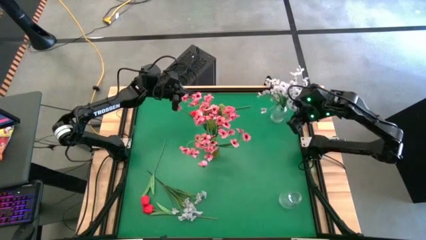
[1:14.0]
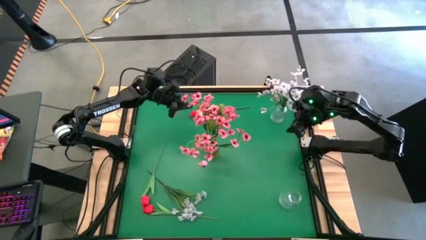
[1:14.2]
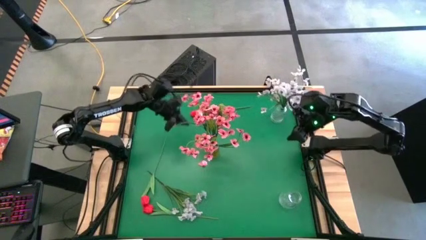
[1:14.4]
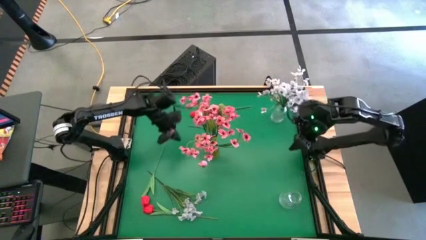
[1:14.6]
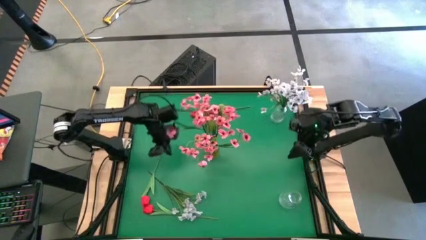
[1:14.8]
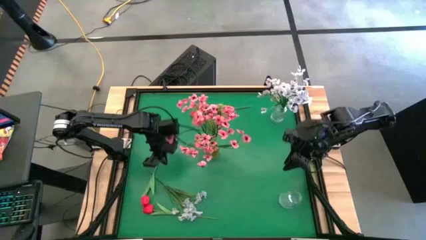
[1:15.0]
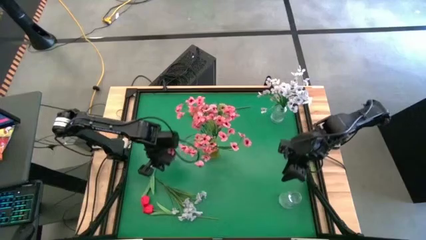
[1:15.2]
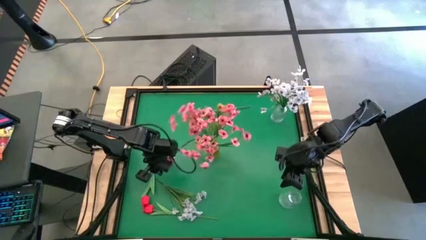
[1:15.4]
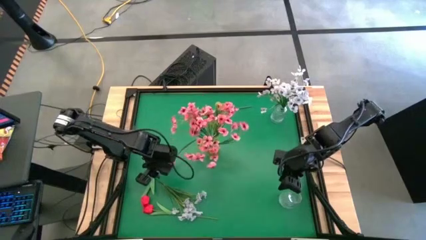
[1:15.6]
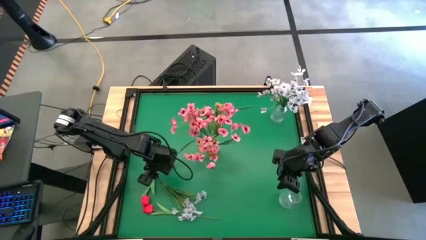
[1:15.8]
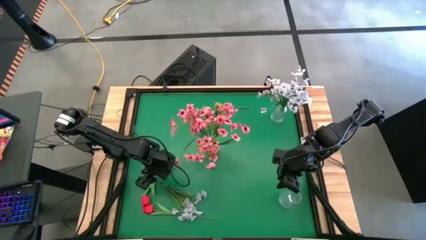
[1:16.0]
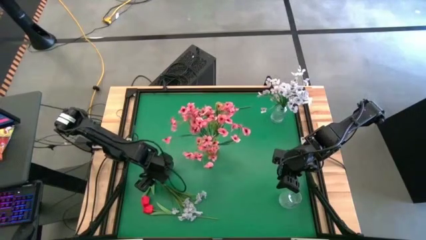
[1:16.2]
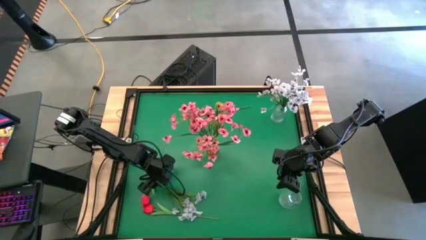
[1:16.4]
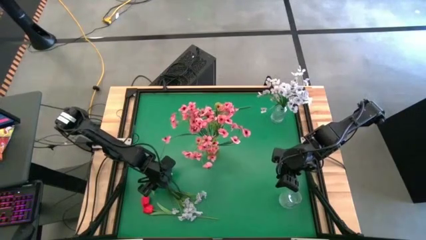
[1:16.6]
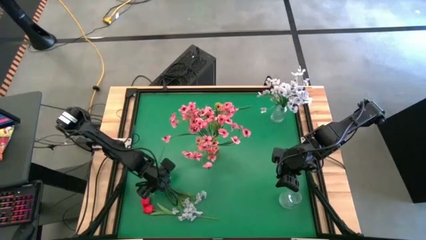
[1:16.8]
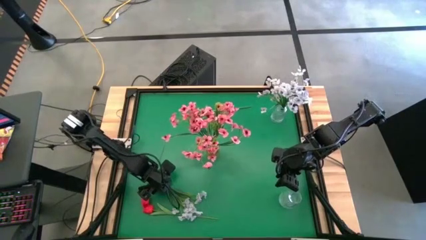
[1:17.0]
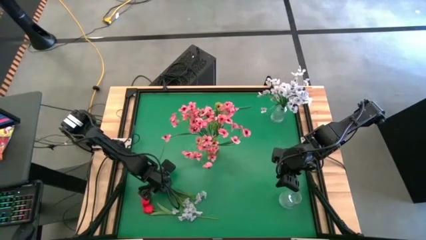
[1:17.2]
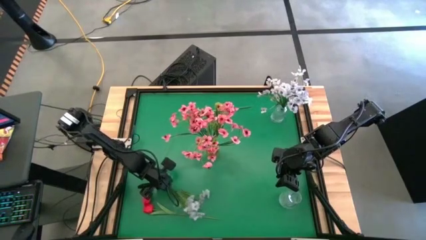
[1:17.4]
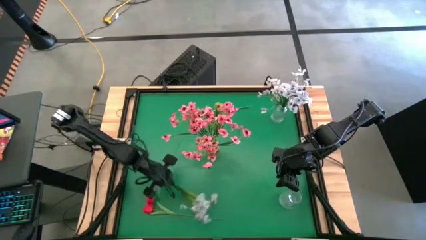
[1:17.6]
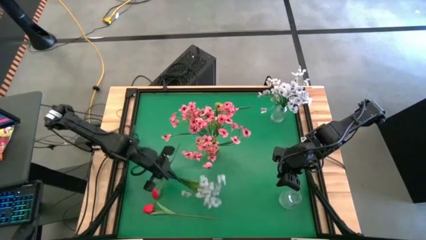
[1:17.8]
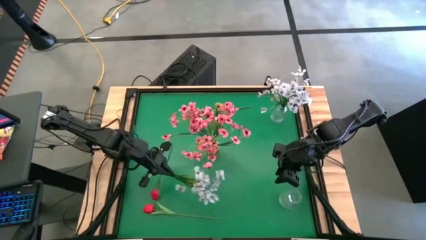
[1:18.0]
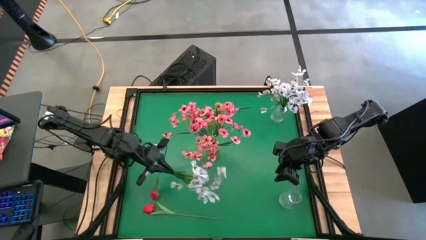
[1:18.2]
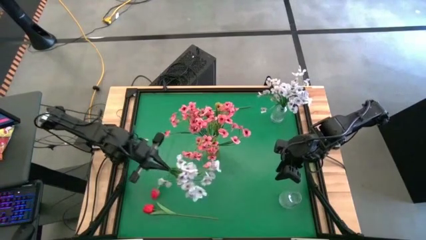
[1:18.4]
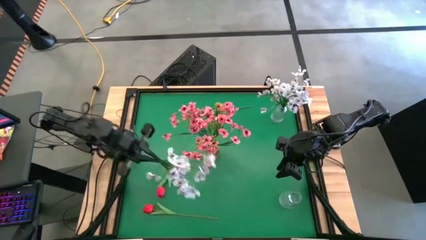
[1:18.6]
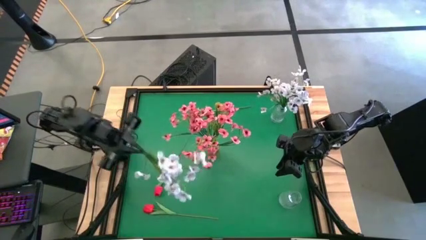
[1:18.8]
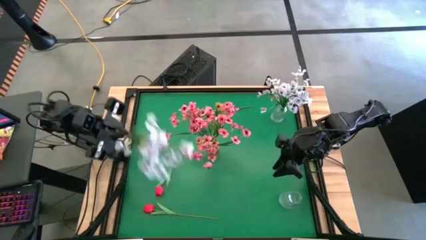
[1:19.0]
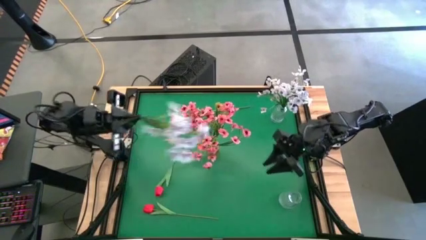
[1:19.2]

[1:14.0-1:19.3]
Task: Sort flowers into vase by color
Put the white flowers into the top transparent vase

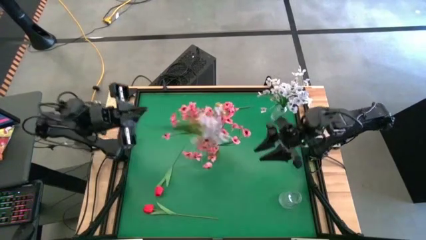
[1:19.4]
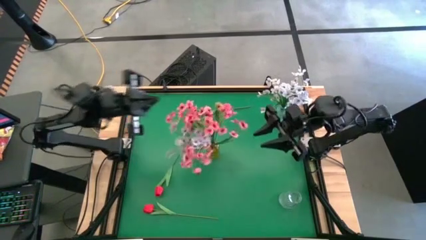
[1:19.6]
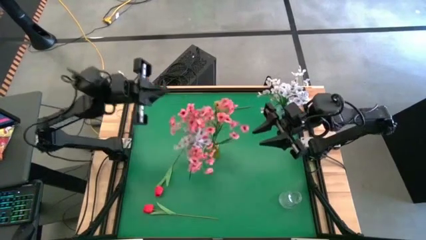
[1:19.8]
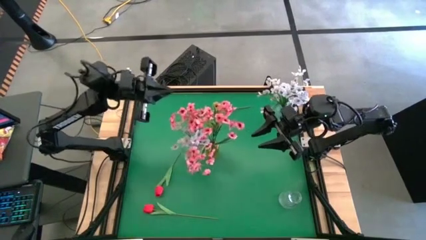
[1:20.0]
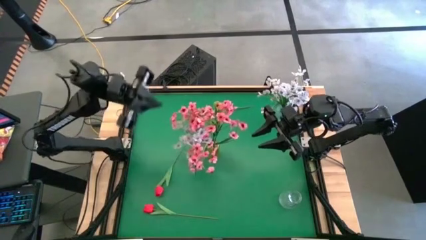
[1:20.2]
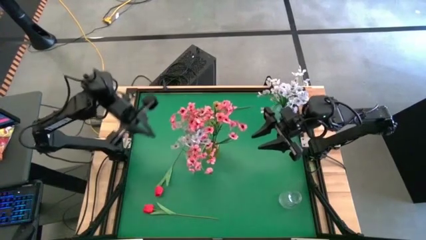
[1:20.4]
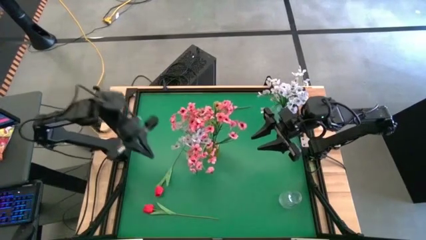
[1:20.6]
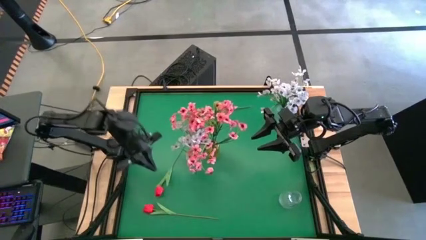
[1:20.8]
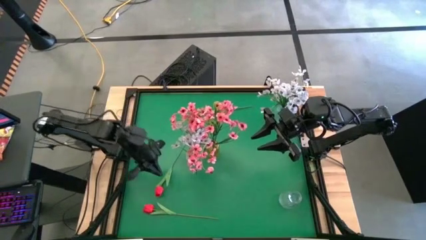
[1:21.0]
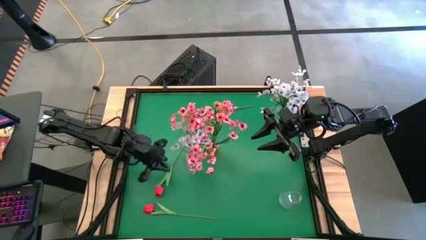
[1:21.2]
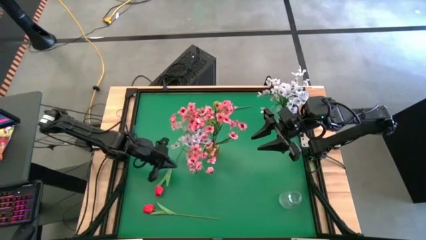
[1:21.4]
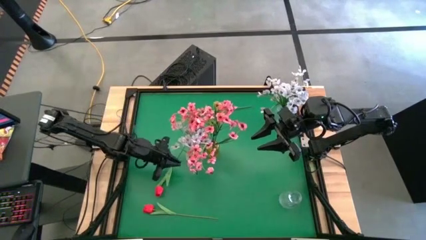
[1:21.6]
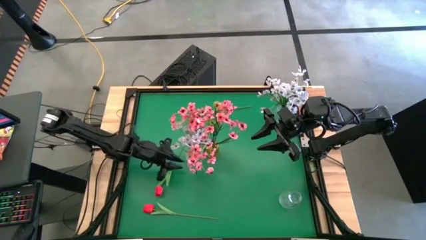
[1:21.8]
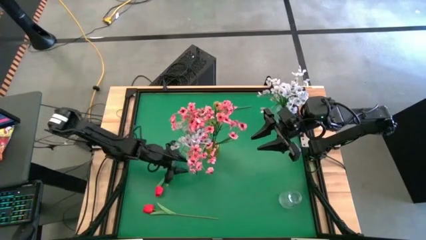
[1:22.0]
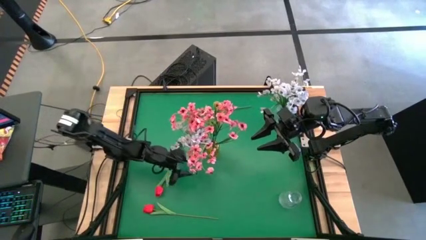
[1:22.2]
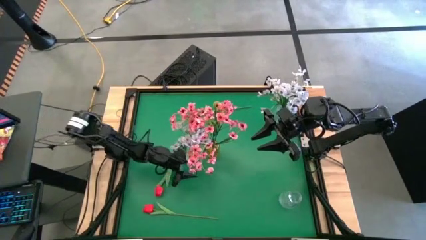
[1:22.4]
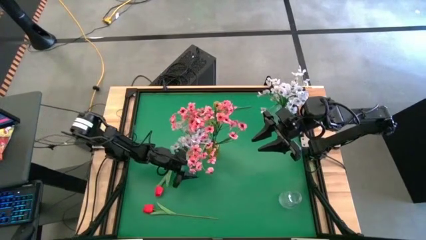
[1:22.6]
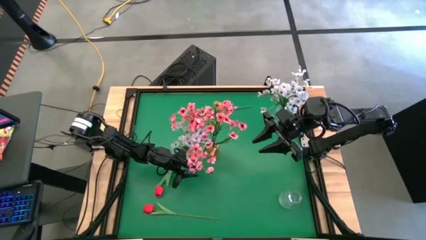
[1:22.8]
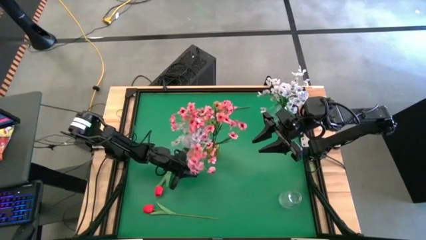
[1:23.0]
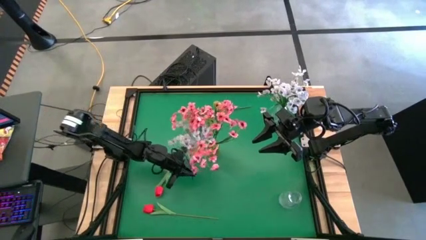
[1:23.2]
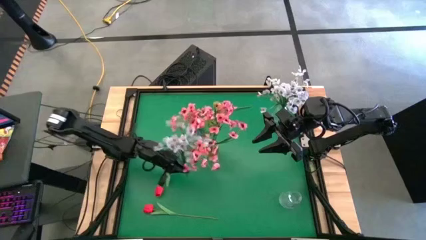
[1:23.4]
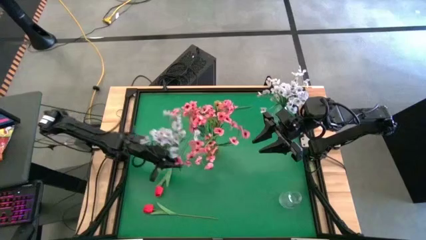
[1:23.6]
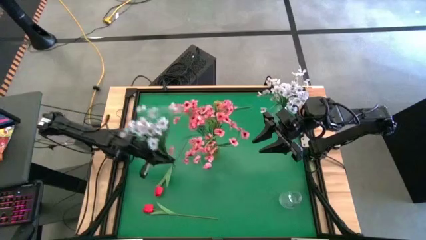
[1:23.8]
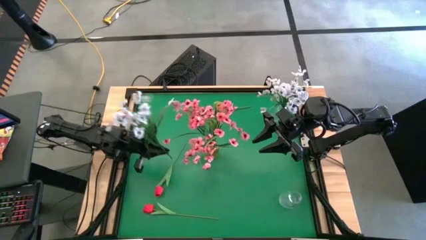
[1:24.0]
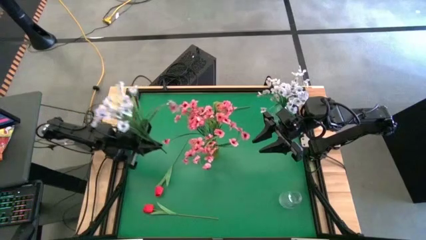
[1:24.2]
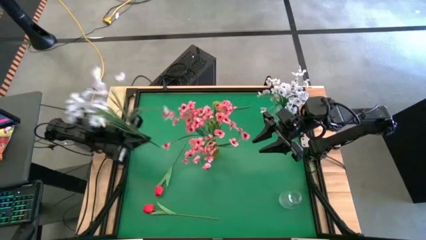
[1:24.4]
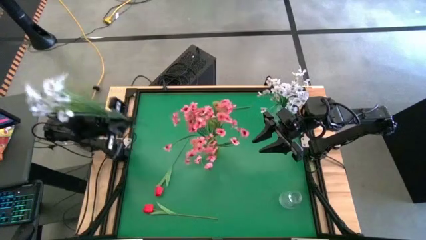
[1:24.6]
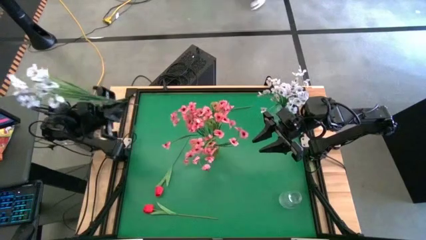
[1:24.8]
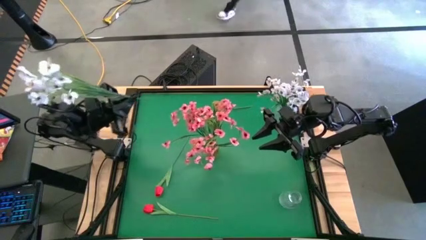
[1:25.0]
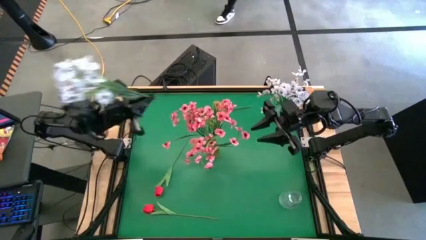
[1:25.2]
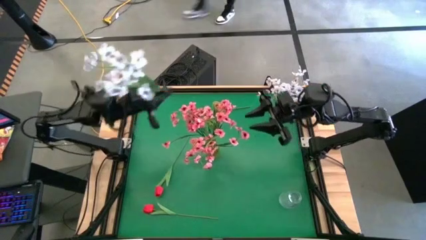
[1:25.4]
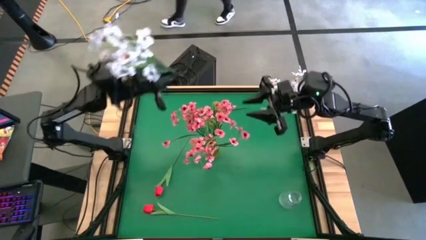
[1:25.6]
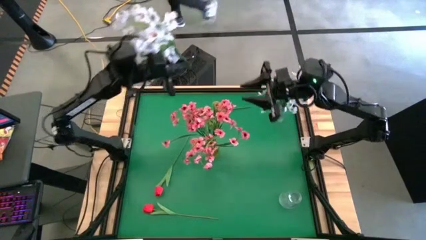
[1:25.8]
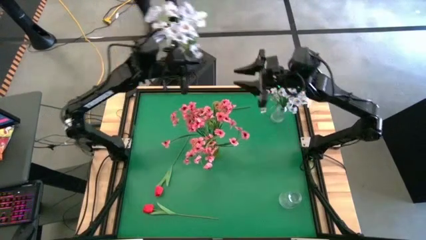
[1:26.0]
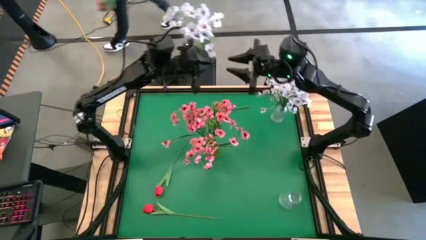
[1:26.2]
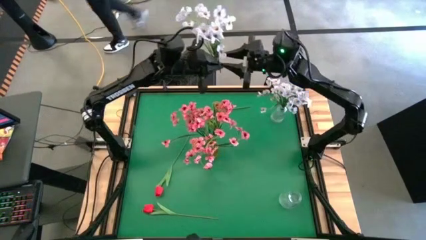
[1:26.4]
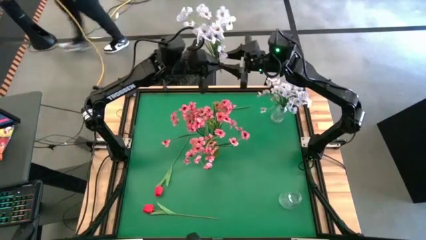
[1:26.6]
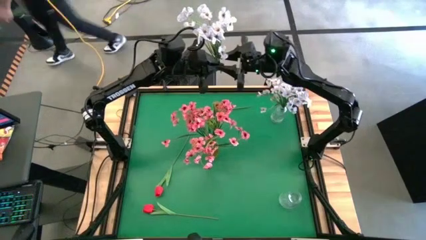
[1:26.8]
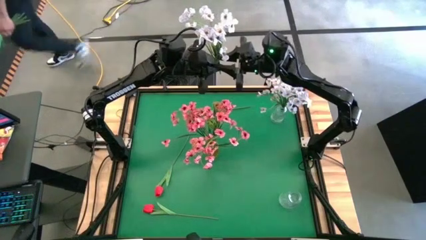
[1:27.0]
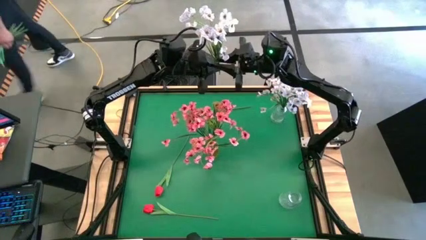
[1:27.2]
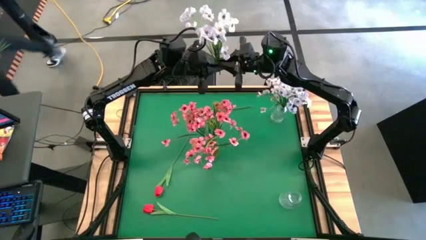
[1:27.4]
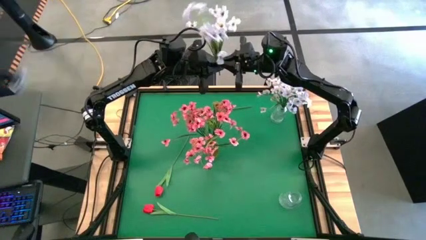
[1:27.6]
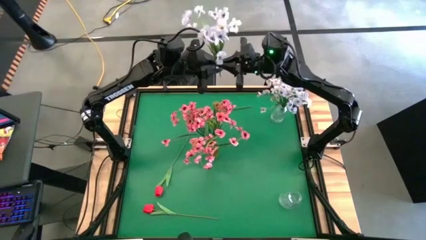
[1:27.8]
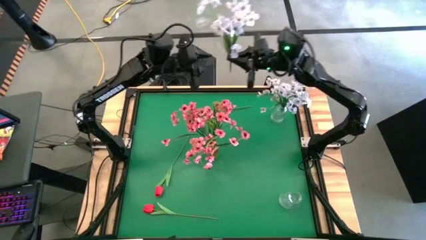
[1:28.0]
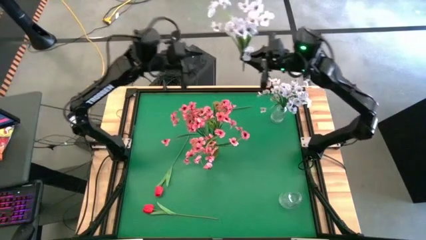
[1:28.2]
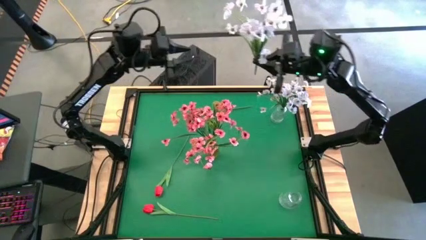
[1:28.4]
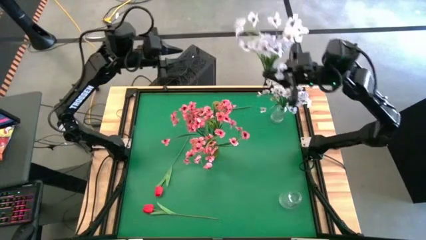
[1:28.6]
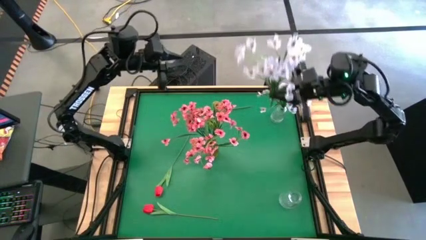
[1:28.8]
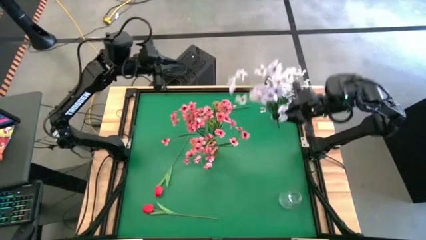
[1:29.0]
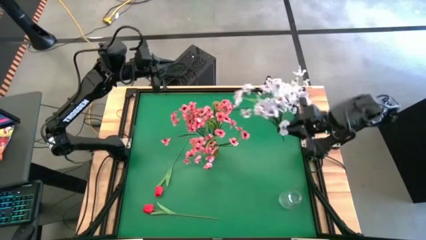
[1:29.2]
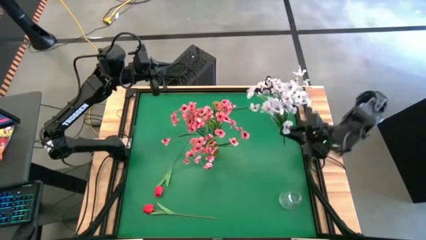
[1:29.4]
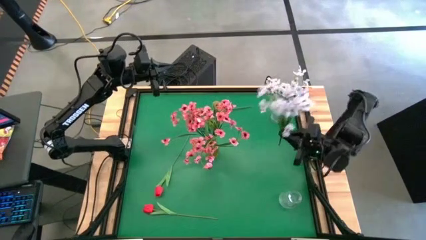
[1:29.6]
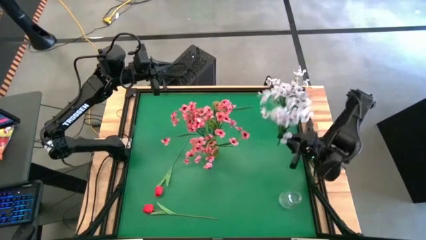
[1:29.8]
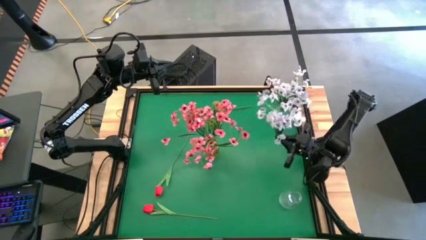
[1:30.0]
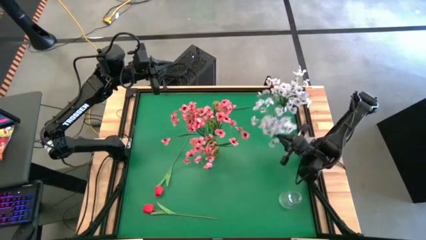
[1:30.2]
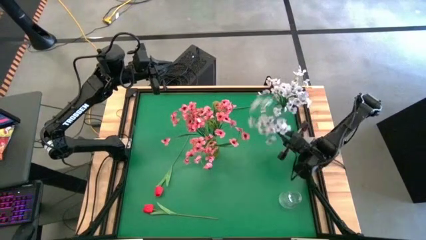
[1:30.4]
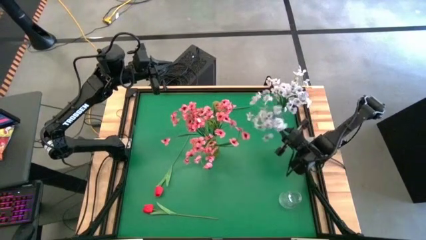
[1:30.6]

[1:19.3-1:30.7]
Put the white flowers into the top transparent vase
